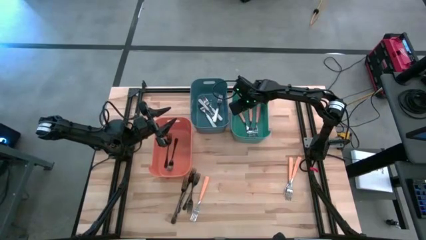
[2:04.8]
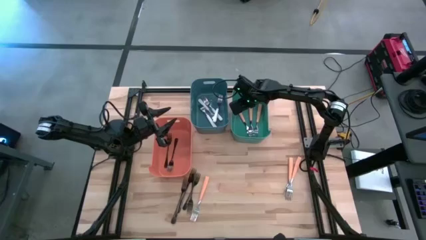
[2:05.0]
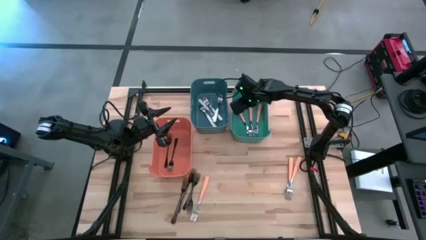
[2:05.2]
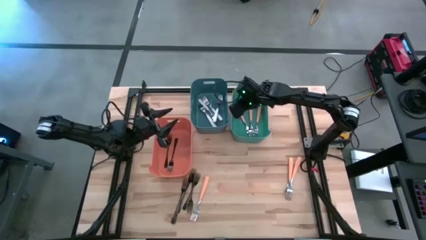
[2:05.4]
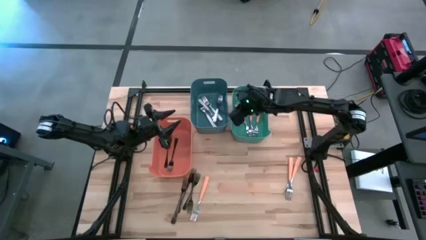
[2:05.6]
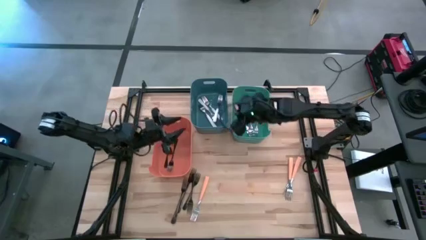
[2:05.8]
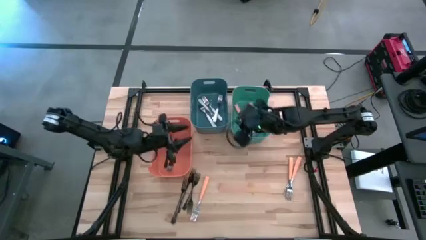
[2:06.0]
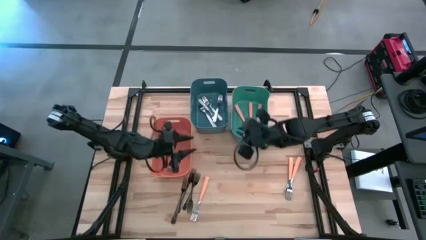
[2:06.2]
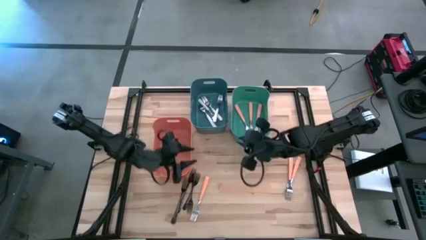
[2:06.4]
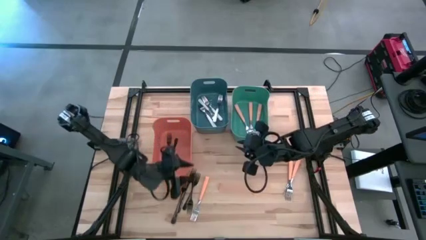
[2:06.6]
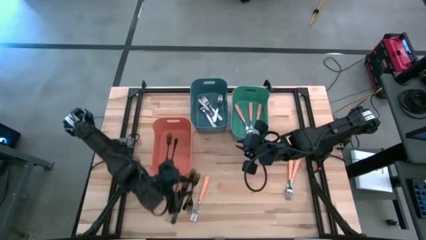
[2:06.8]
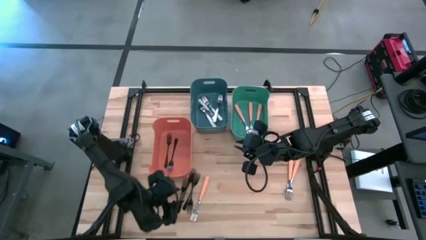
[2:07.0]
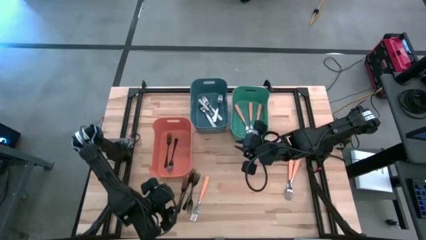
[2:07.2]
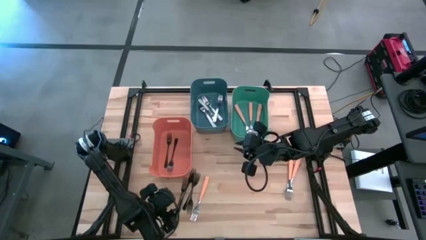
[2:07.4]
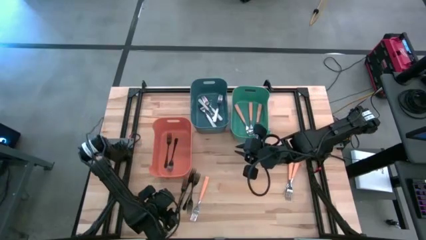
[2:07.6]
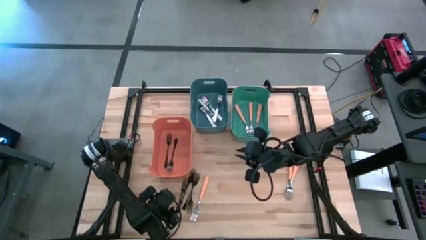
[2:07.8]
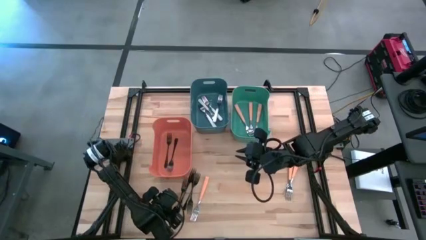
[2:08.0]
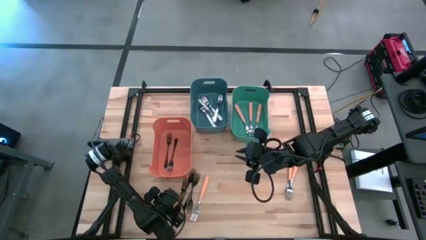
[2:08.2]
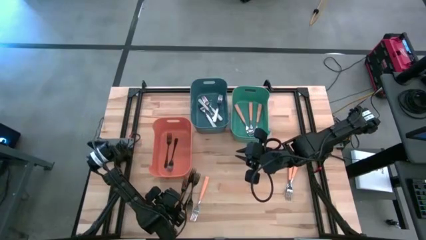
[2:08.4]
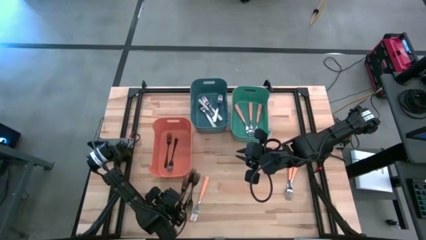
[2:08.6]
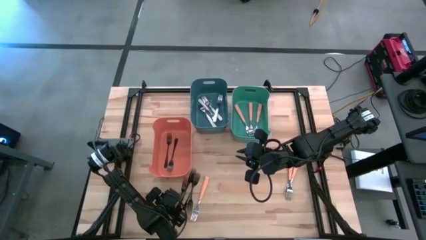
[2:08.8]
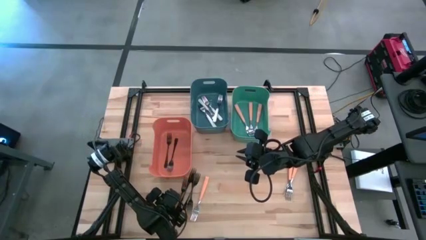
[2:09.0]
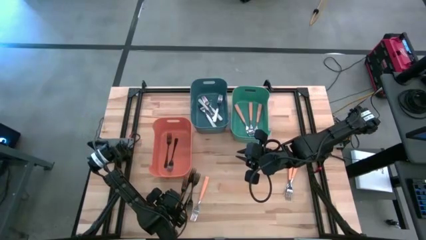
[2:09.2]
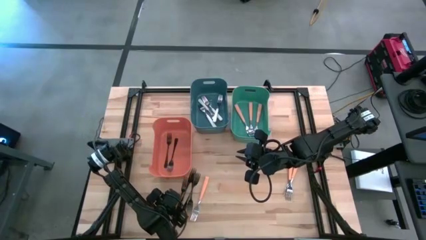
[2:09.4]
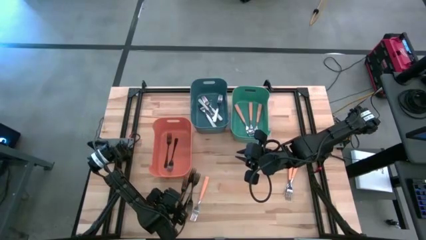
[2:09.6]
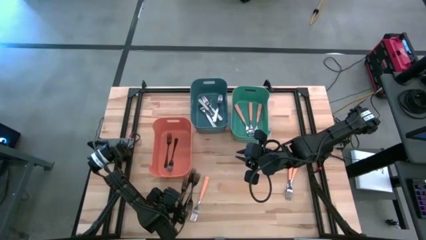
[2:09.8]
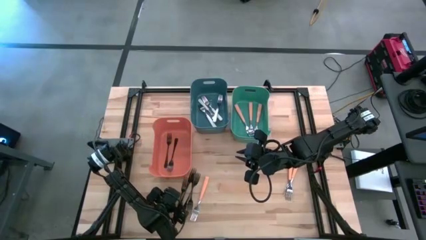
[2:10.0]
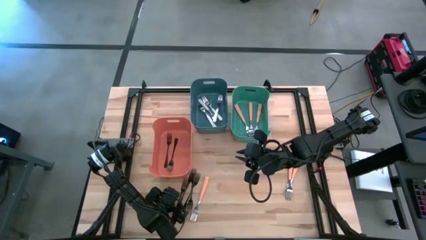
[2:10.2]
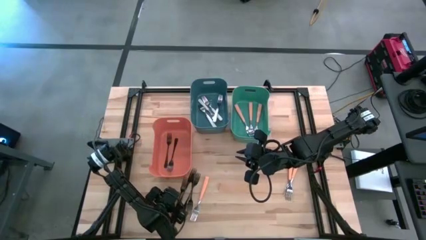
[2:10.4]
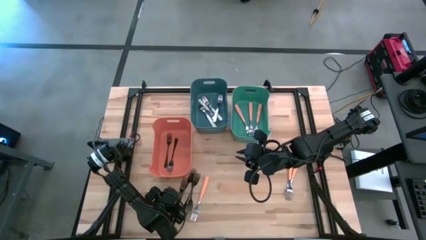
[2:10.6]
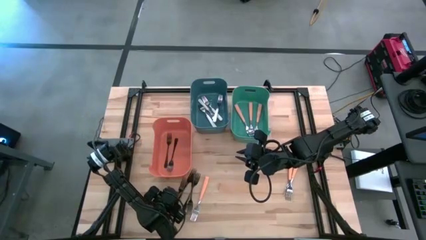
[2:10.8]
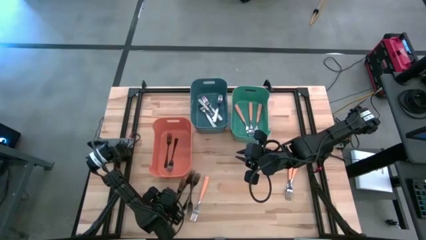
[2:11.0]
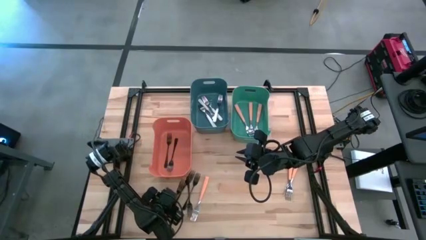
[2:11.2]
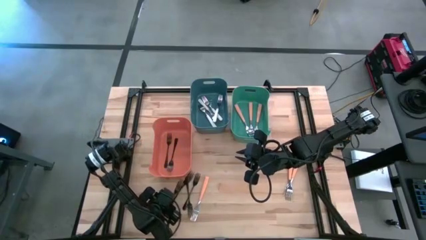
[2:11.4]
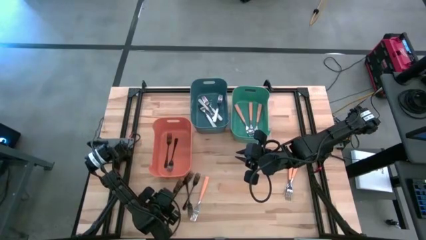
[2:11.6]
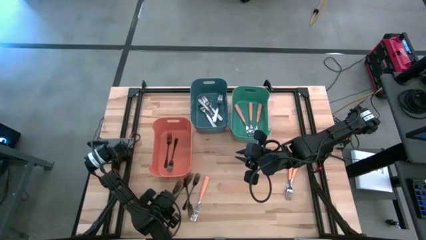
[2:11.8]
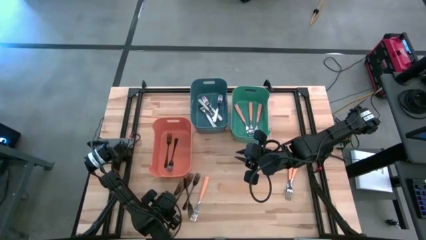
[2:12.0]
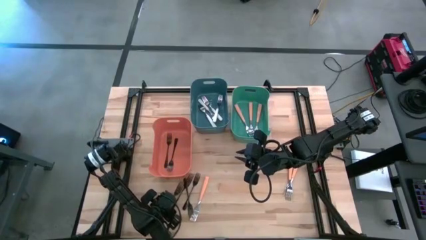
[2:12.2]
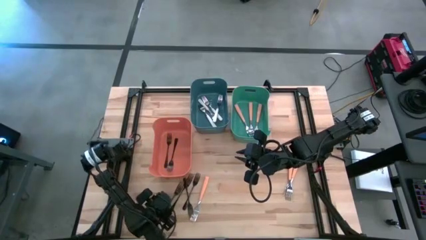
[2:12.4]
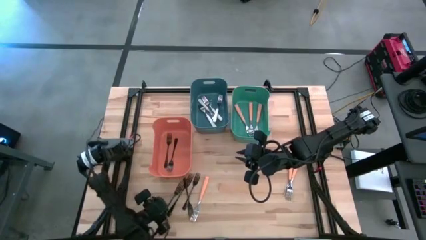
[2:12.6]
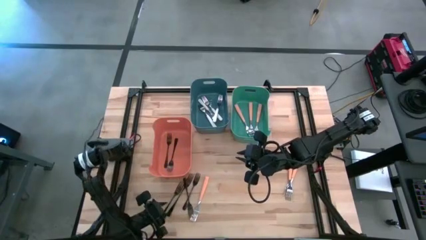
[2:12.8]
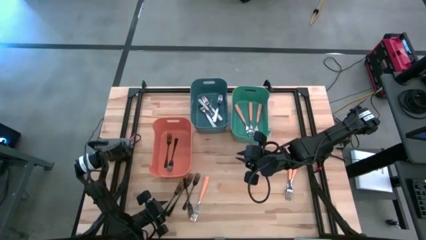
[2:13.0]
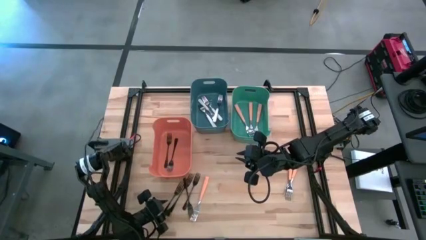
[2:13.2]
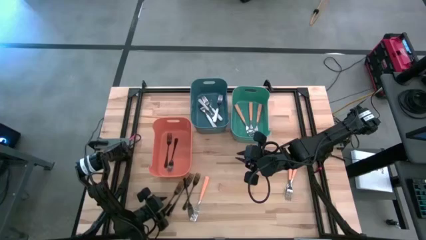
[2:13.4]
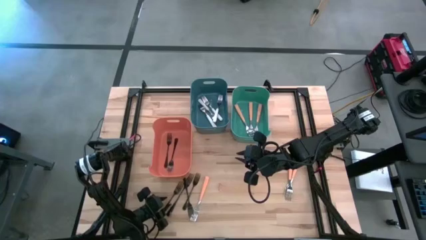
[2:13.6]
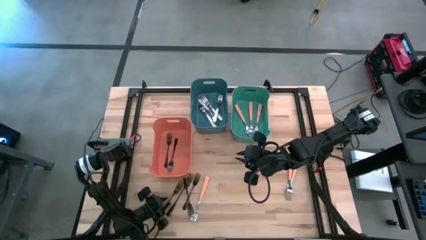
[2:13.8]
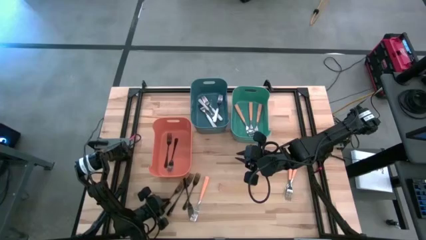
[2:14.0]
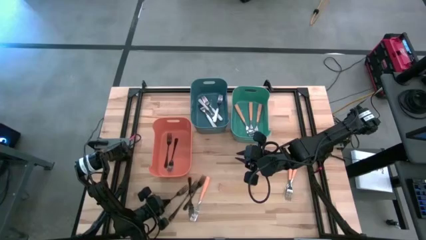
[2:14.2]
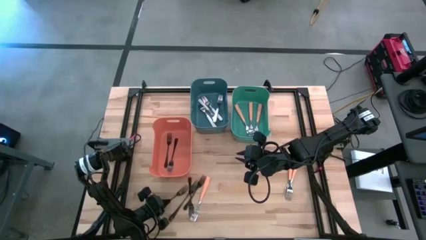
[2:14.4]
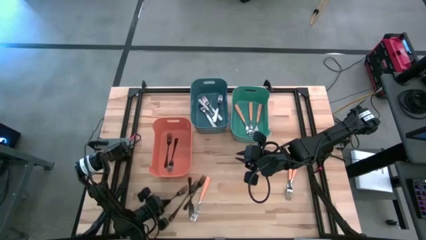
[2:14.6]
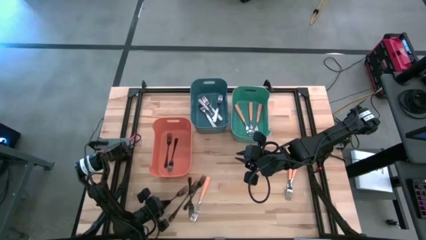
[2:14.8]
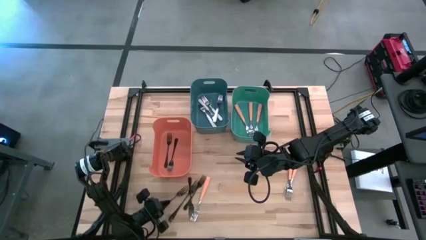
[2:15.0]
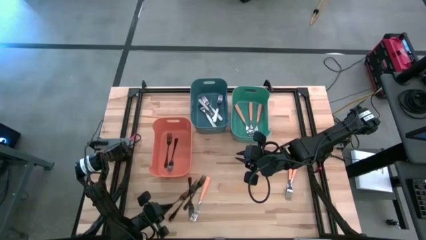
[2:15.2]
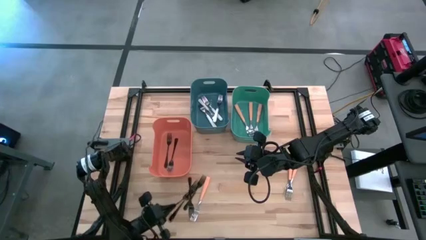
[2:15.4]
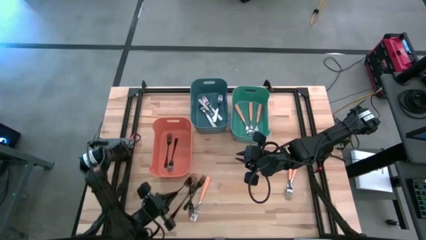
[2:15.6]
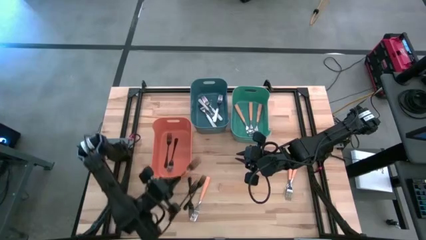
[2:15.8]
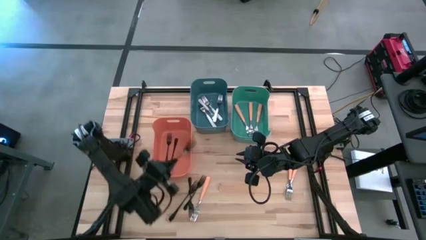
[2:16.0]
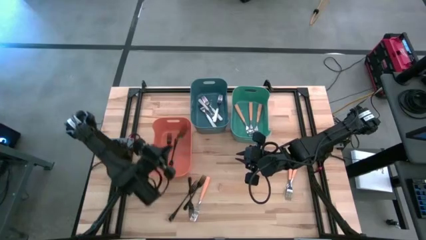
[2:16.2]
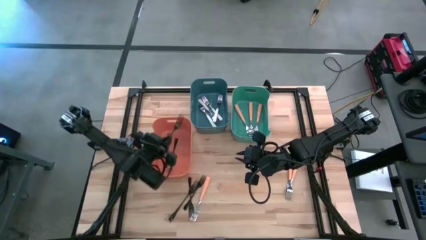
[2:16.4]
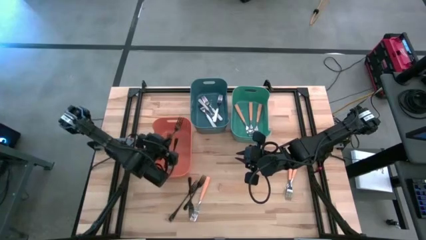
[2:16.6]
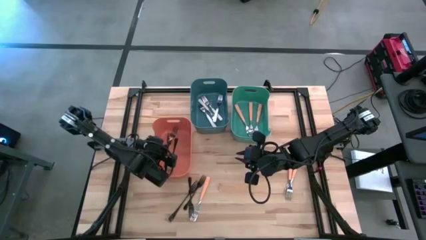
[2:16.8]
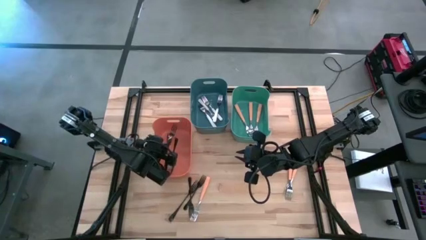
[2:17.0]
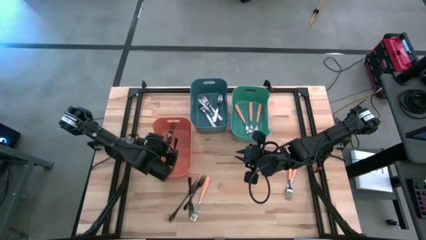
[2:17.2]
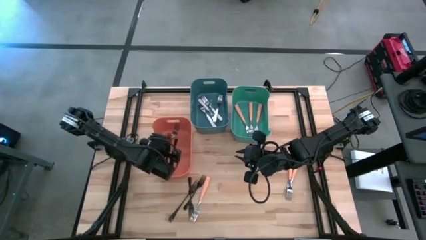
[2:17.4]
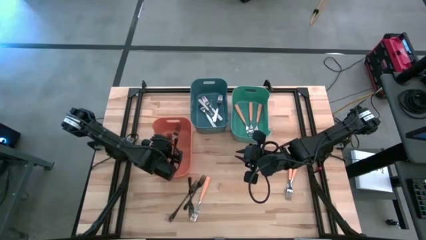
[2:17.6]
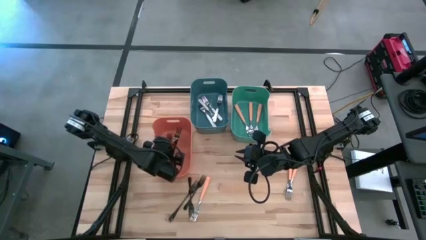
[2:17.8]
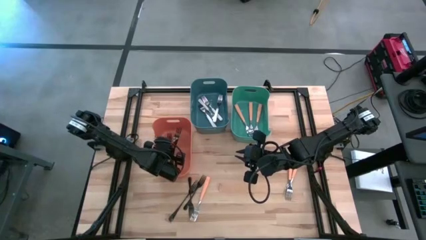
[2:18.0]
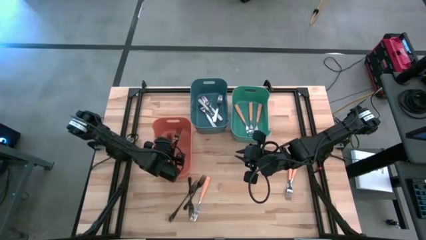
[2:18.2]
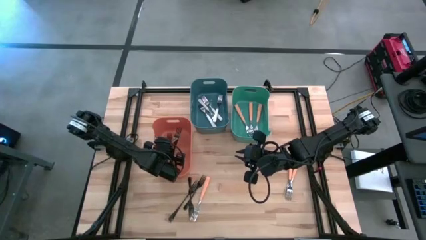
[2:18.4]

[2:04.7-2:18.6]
Task: Sort silverware by color (type)
Put the black fork into the orange bin
